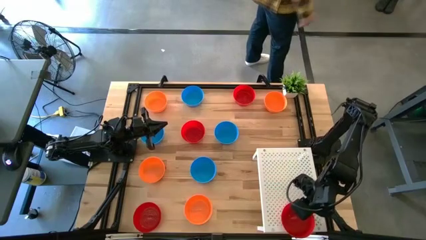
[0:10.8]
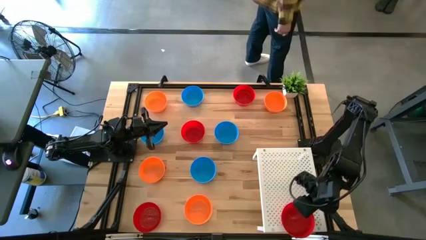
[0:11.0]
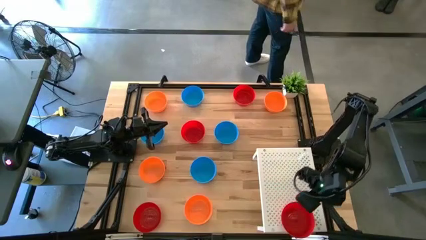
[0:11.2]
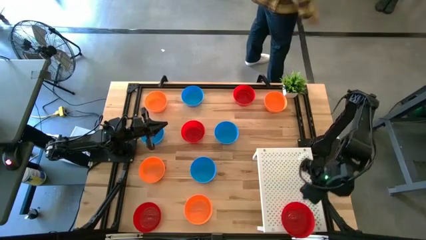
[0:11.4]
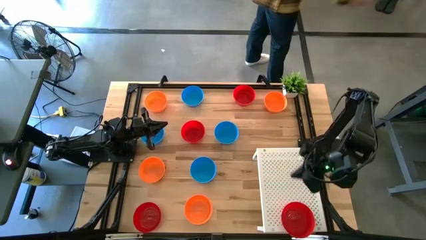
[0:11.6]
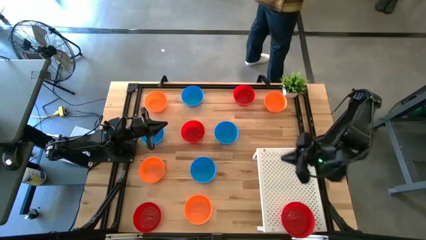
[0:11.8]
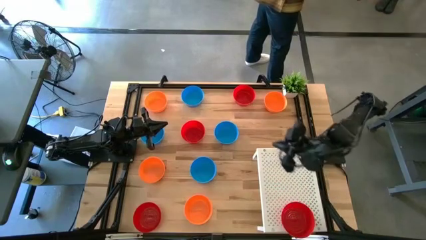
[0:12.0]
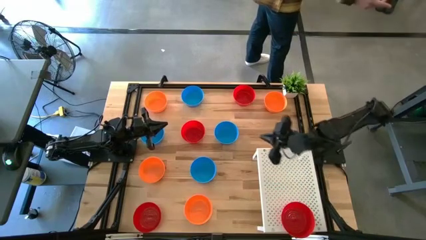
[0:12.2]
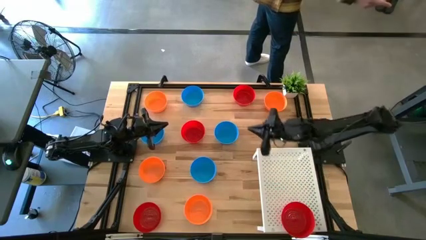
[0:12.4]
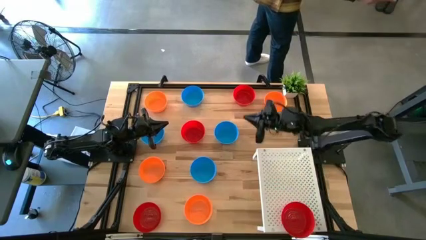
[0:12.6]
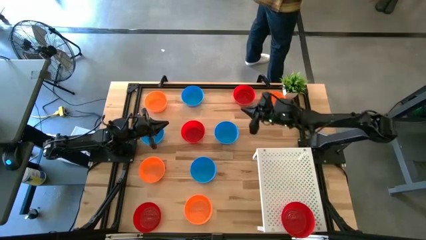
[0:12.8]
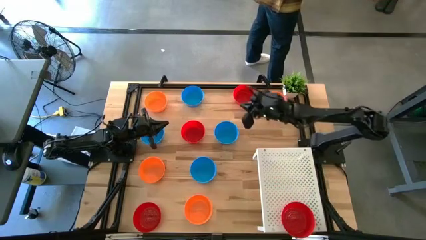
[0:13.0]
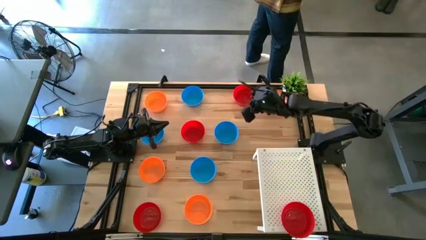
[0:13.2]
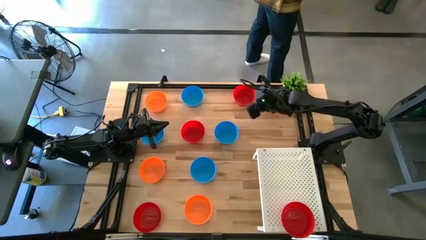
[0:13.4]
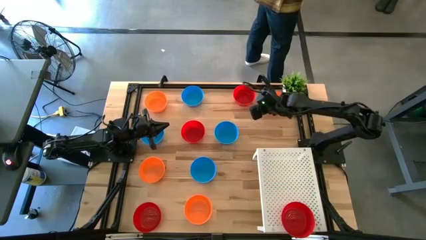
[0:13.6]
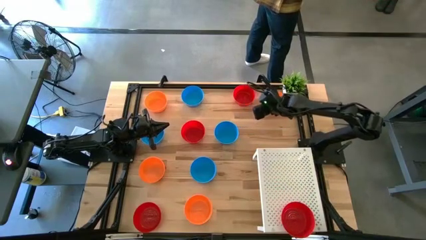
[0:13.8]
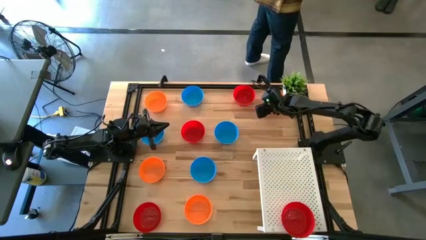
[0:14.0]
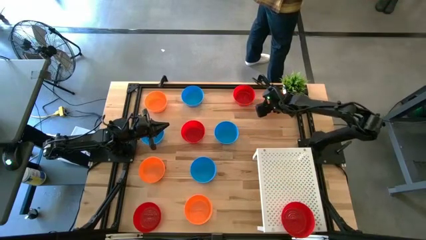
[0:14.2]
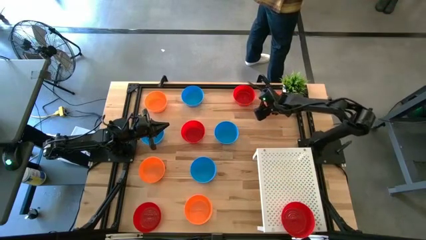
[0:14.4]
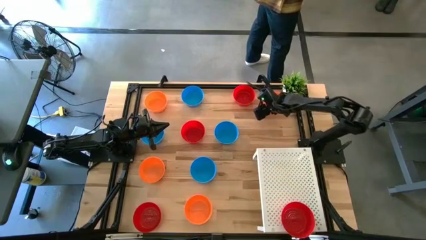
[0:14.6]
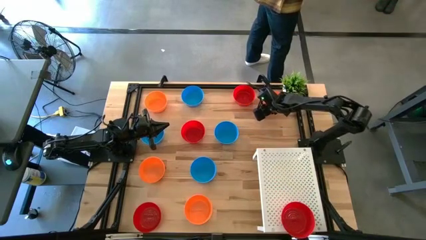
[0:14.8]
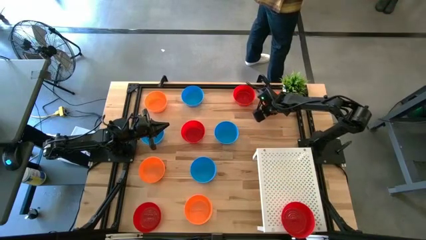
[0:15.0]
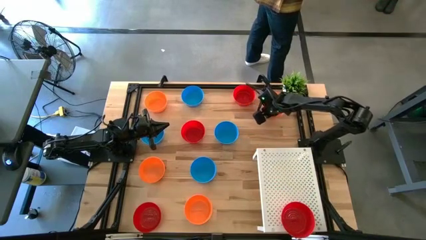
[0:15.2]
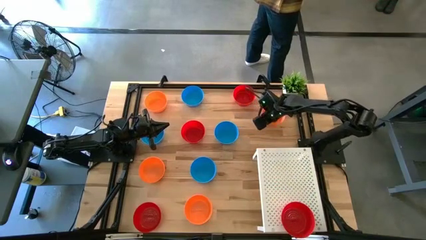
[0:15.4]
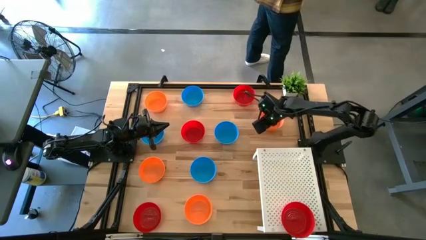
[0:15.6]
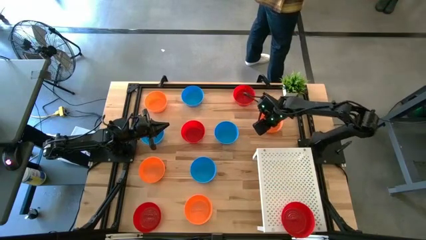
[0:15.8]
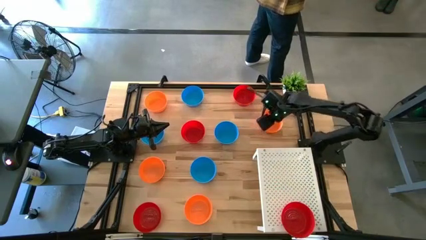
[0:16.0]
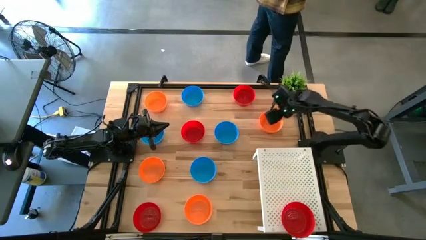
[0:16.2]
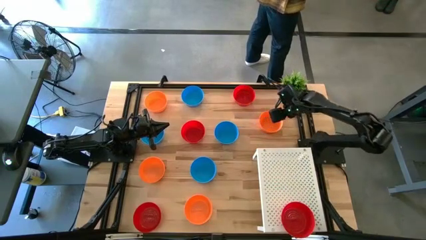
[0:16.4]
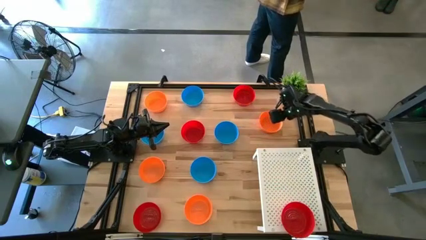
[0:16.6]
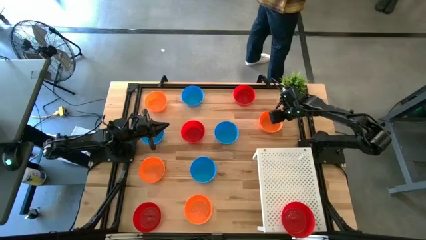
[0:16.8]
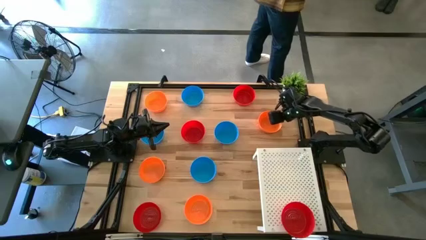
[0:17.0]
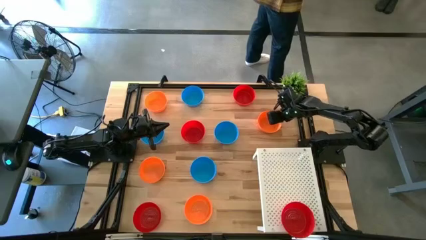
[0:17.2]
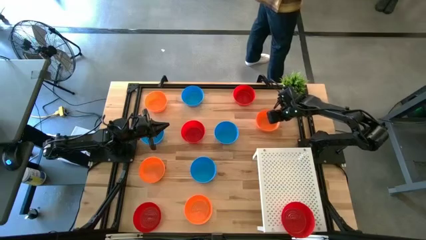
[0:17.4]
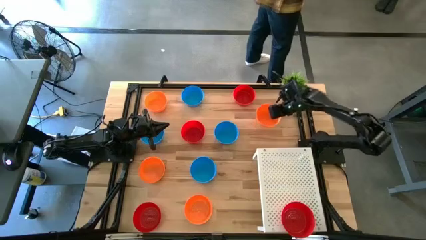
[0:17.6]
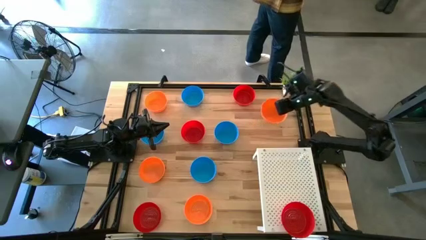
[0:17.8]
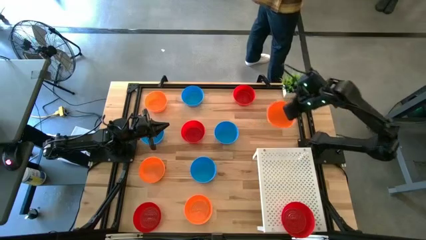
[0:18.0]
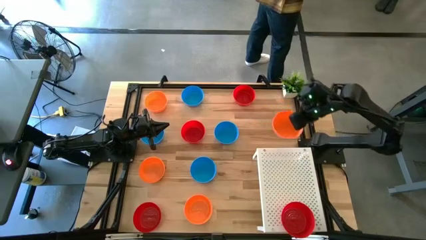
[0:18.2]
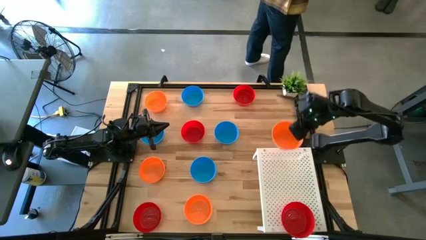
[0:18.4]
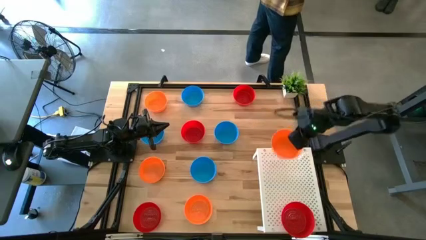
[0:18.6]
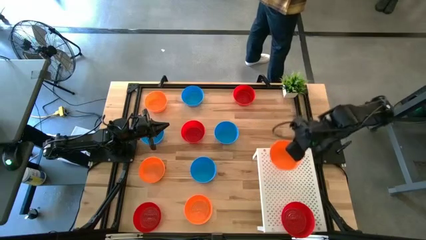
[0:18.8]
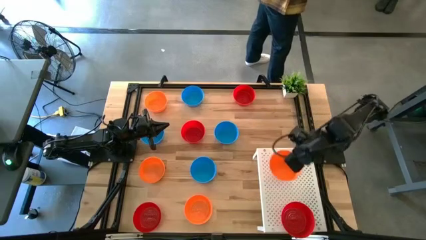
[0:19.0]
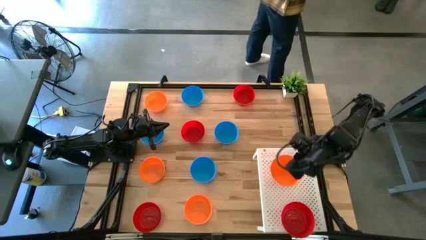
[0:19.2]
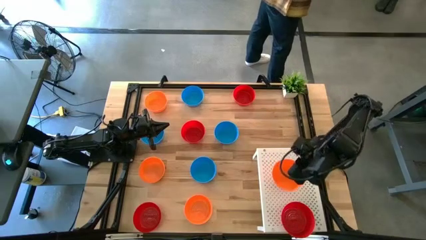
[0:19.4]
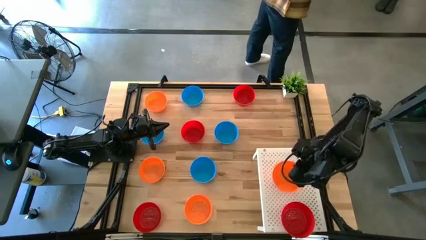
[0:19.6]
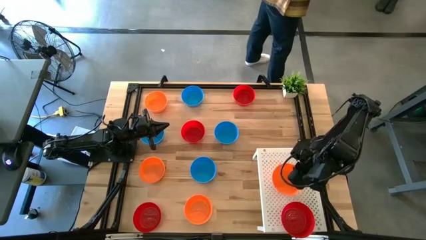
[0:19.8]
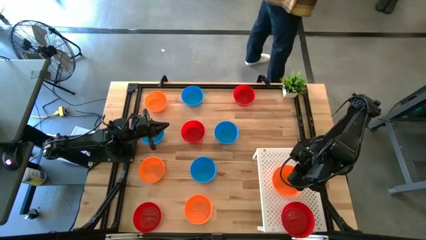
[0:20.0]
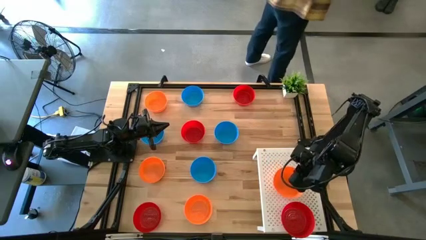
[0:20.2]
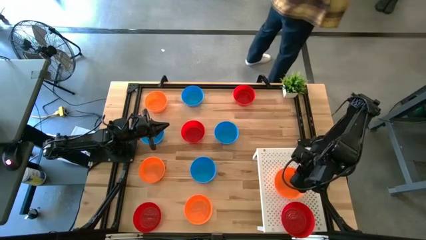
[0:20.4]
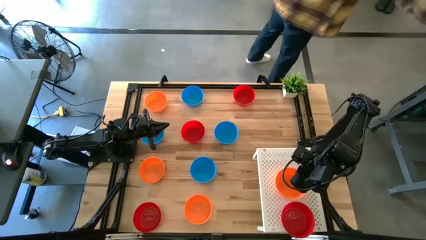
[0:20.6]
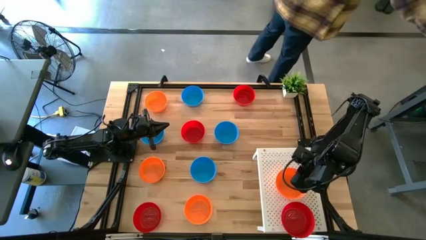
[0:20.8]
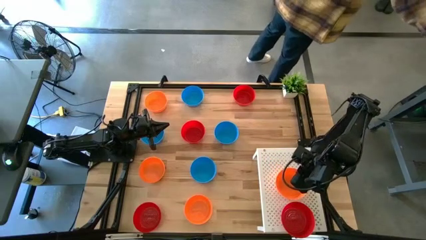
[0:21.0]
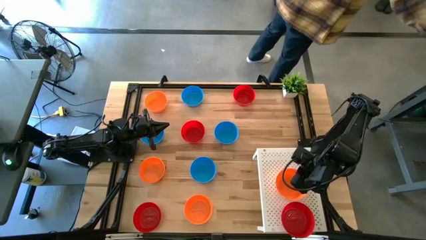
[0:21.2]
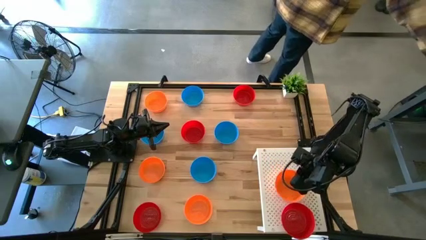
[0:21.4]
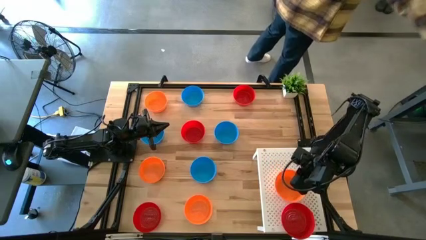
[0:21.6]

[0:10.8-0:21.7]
Task: Pick & Place Mini bowls
Put the orange bowl on the shelf

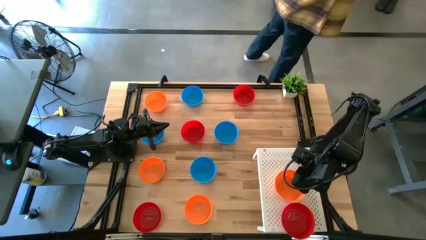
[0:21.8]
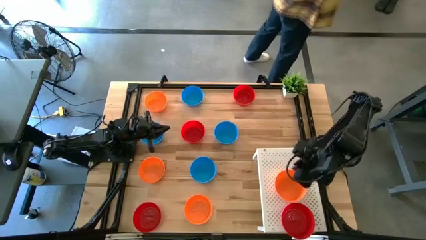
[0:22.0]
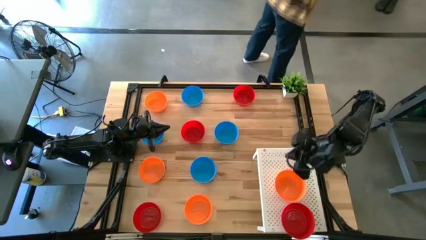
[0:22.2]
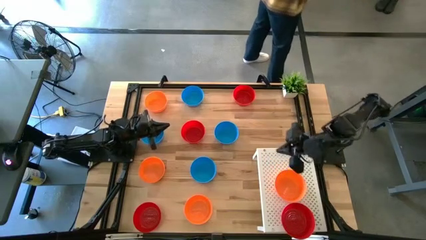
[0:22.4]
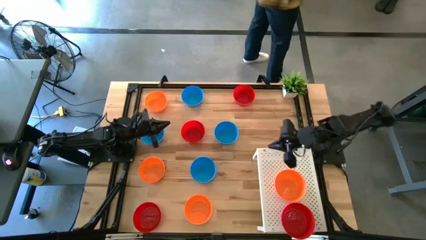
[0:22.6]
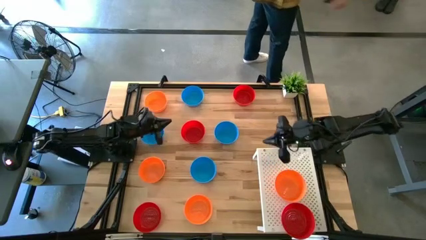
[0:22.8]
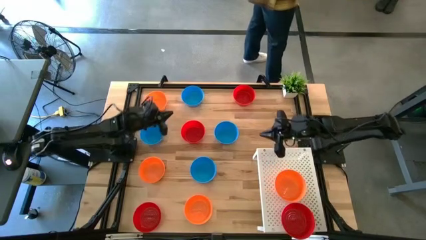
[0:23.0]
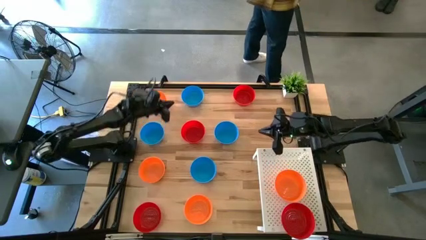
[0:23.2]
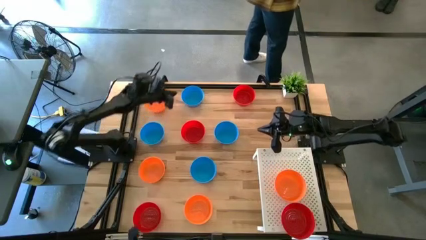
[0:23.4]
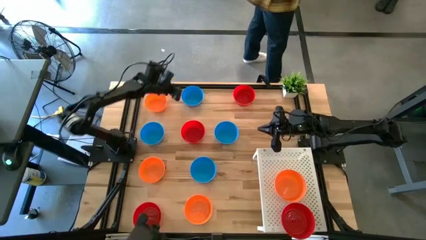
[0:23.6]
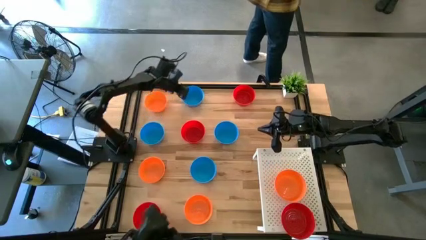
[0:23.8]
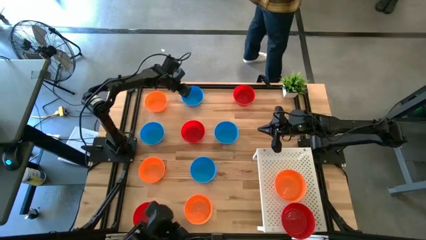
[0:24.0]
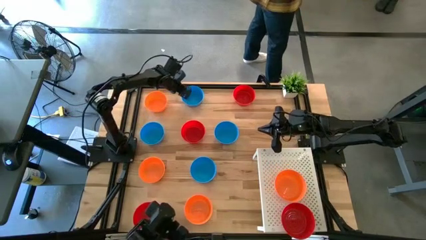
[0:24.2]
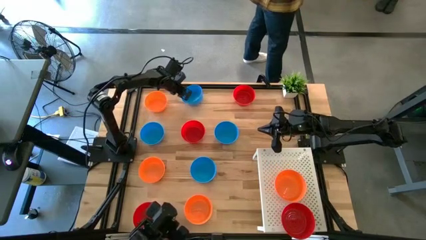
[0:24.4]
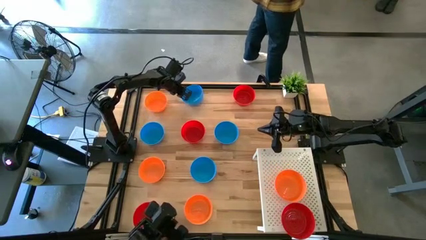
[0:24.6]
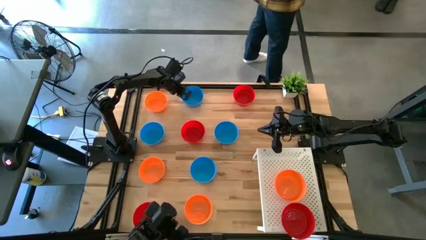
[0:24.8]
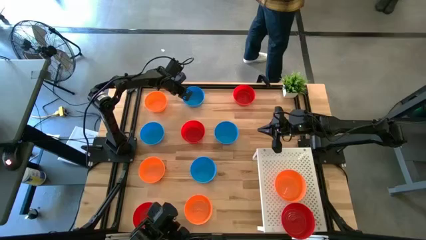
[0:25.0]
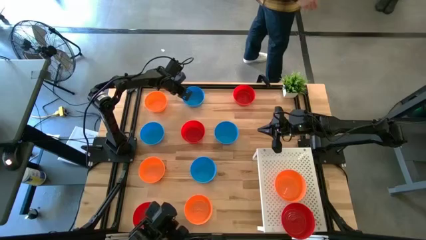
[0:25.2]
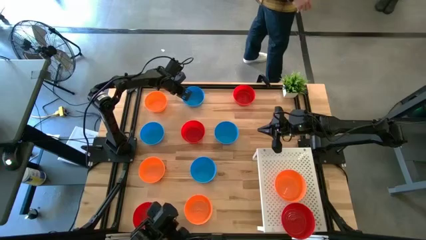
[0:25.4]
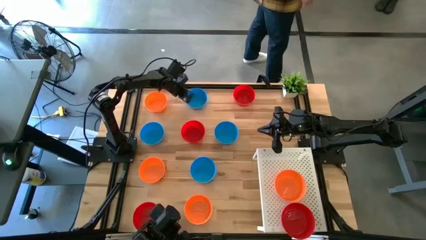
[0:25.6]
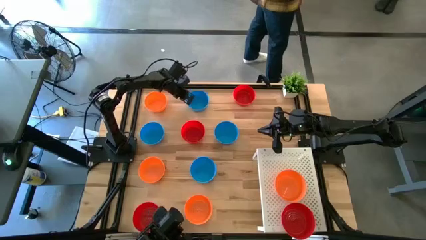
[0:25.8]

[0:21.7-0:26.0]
Put the blue bowl on the shelf
